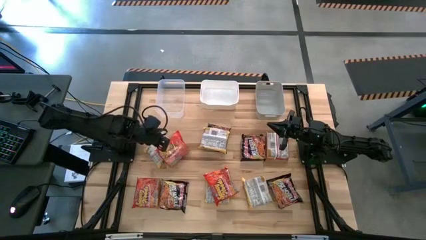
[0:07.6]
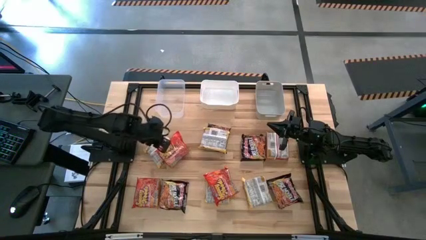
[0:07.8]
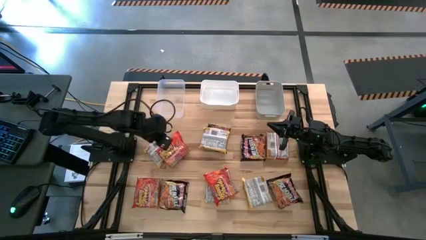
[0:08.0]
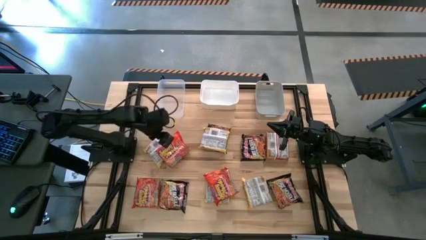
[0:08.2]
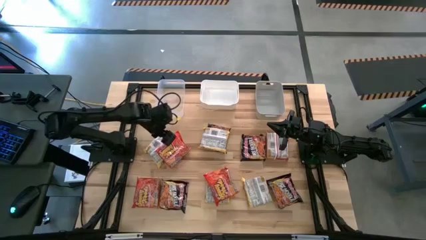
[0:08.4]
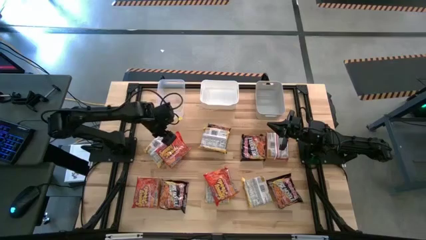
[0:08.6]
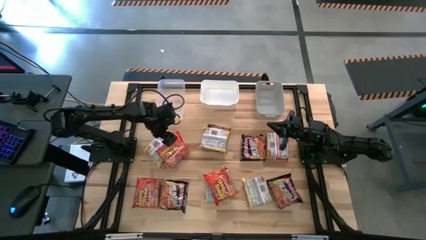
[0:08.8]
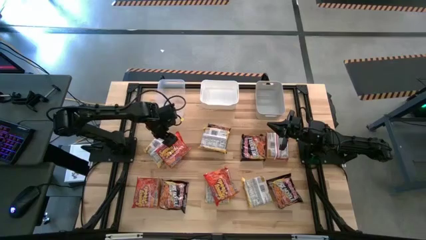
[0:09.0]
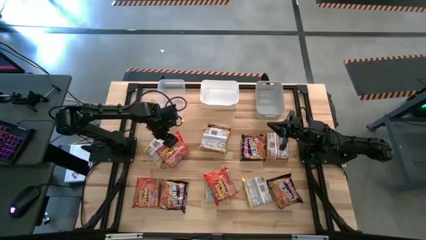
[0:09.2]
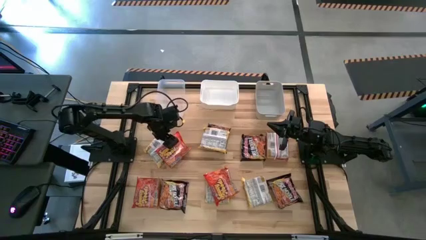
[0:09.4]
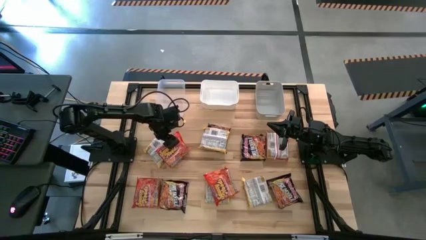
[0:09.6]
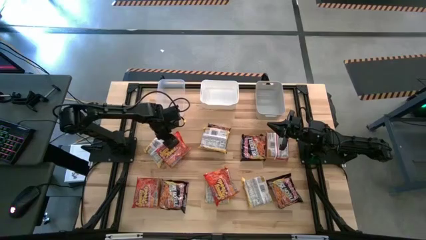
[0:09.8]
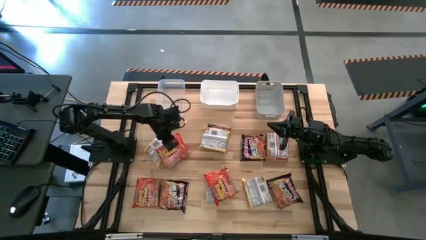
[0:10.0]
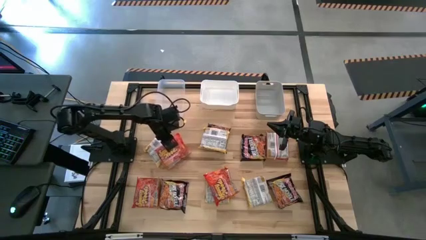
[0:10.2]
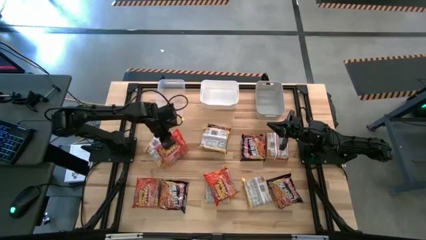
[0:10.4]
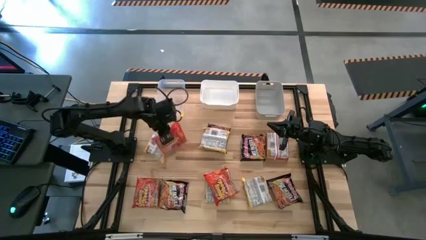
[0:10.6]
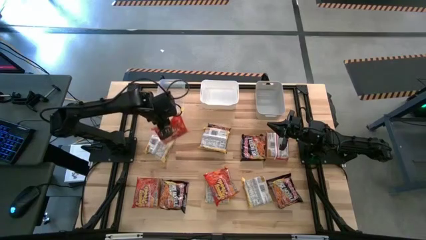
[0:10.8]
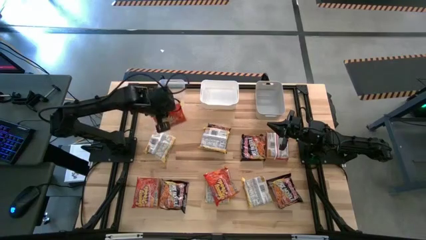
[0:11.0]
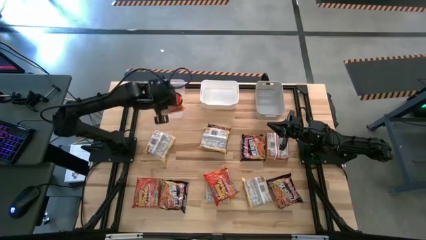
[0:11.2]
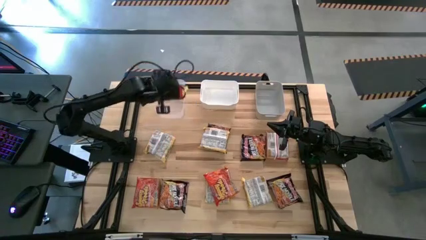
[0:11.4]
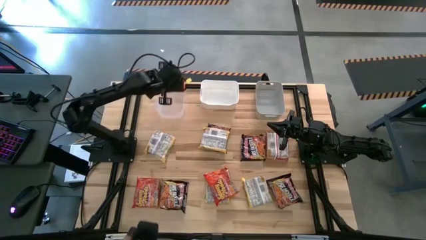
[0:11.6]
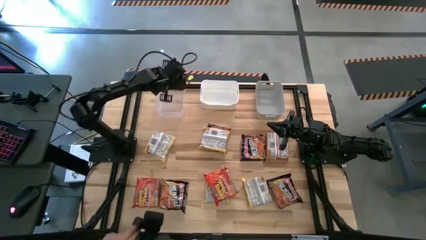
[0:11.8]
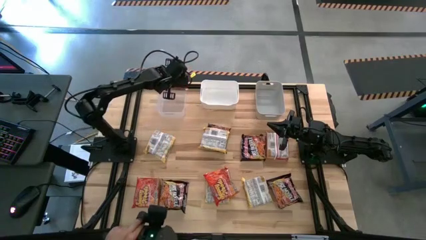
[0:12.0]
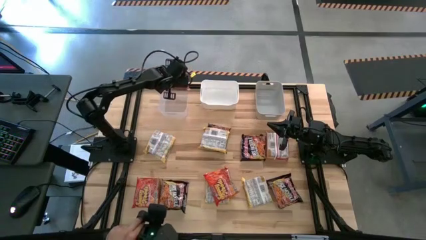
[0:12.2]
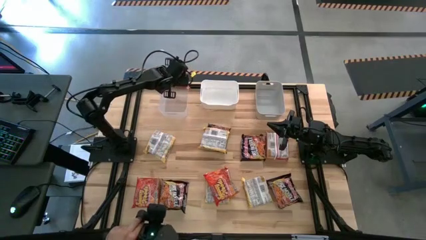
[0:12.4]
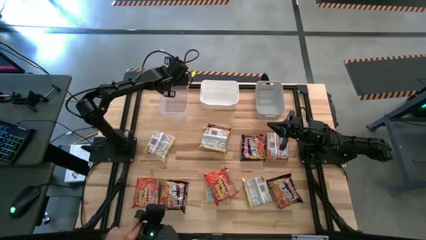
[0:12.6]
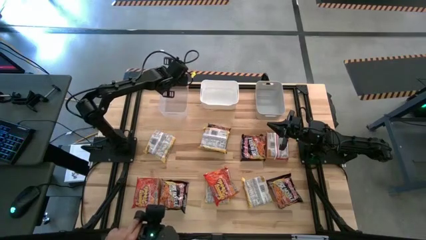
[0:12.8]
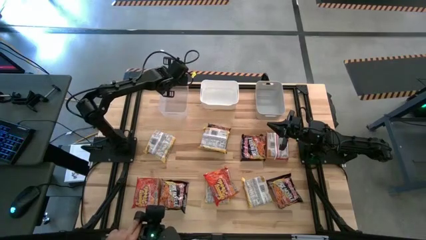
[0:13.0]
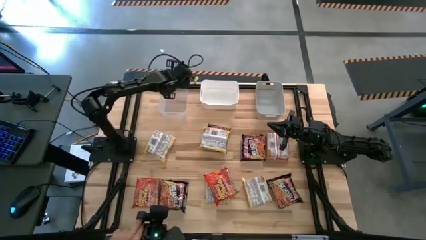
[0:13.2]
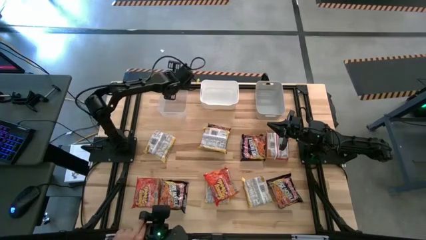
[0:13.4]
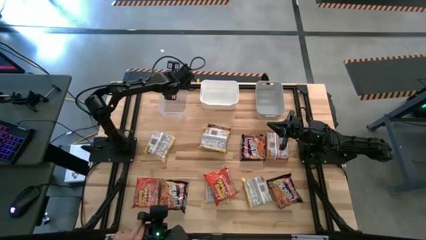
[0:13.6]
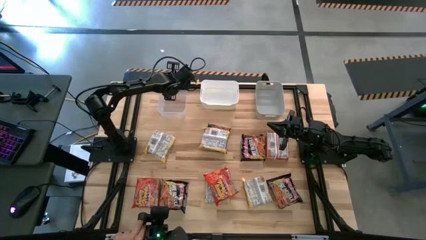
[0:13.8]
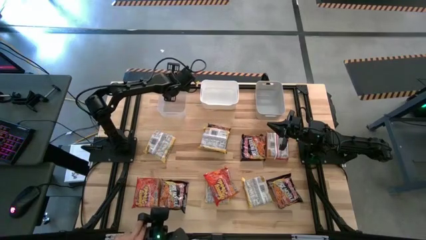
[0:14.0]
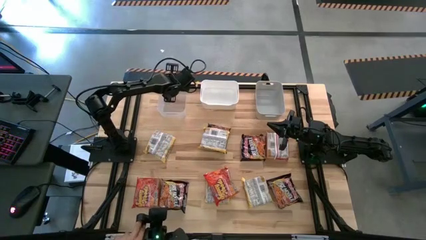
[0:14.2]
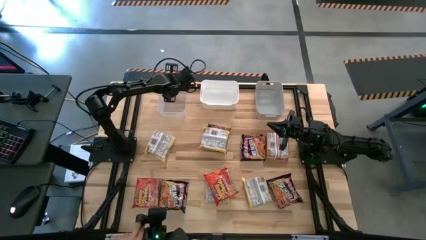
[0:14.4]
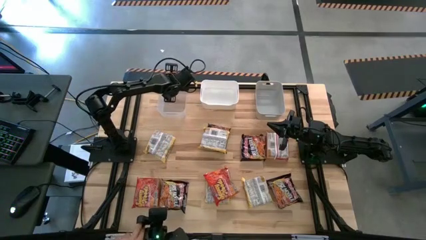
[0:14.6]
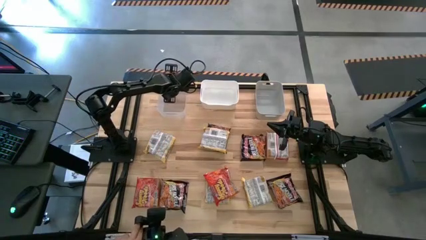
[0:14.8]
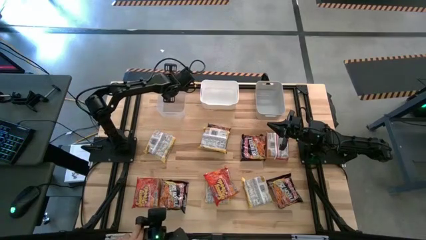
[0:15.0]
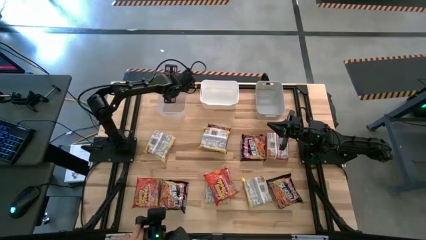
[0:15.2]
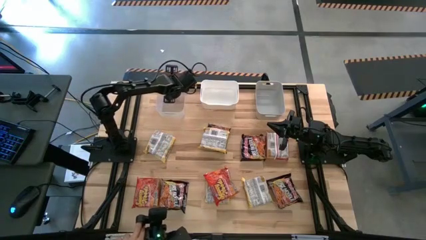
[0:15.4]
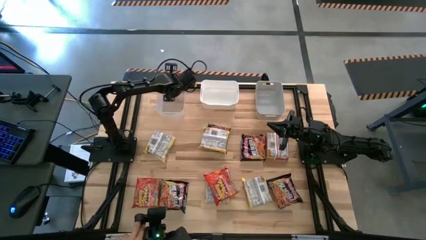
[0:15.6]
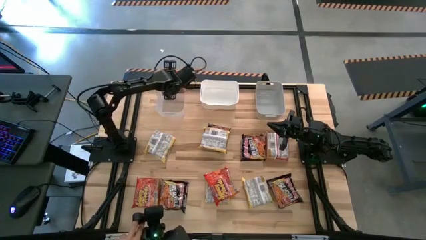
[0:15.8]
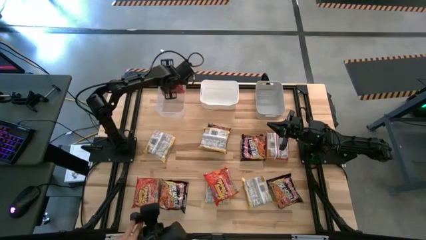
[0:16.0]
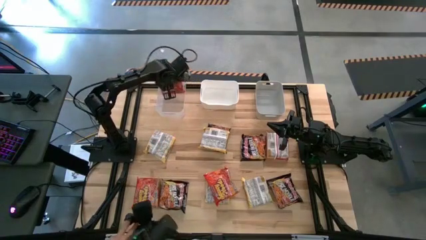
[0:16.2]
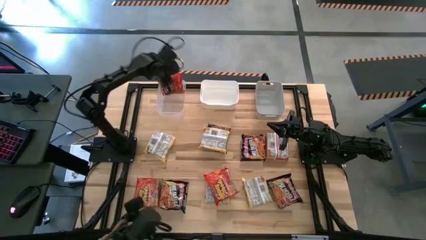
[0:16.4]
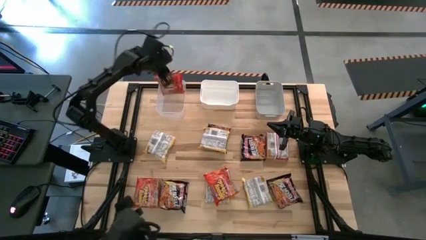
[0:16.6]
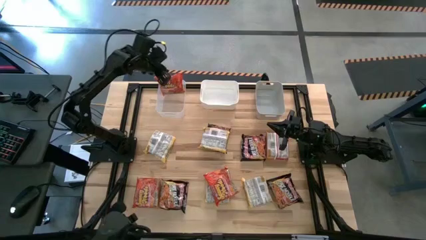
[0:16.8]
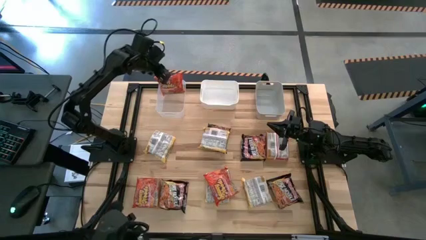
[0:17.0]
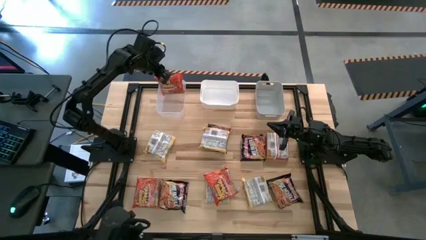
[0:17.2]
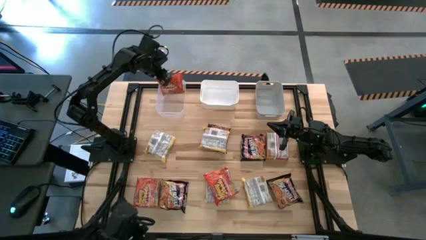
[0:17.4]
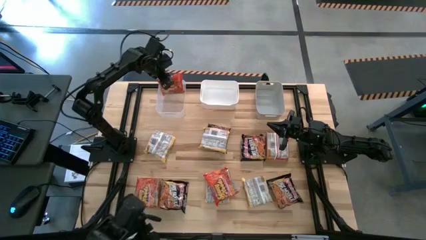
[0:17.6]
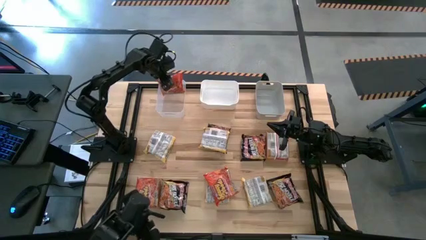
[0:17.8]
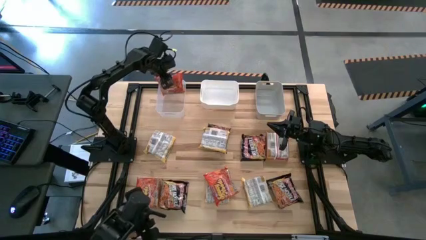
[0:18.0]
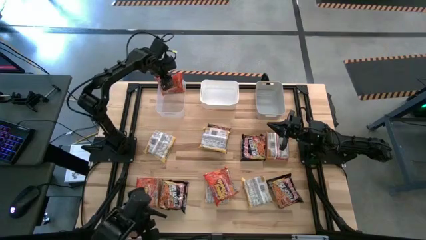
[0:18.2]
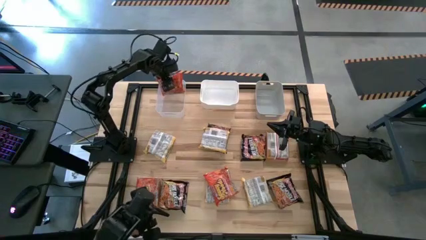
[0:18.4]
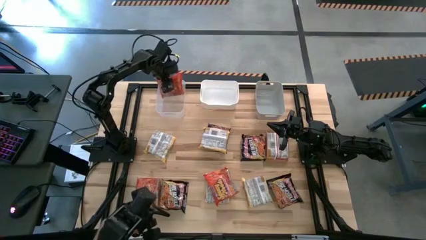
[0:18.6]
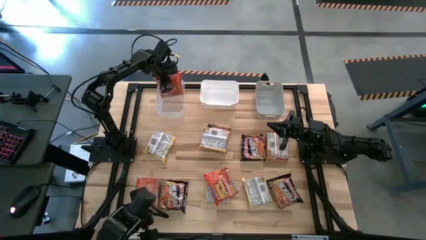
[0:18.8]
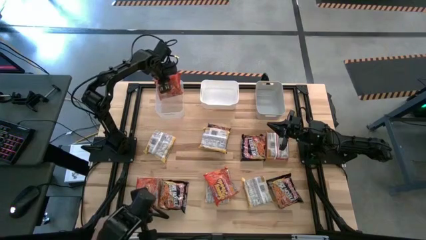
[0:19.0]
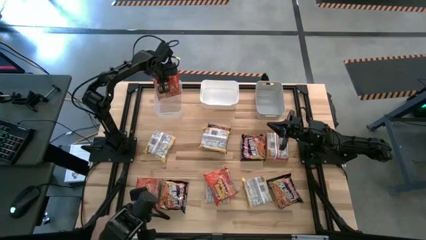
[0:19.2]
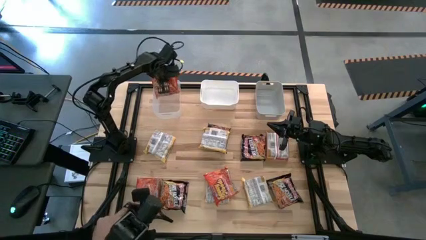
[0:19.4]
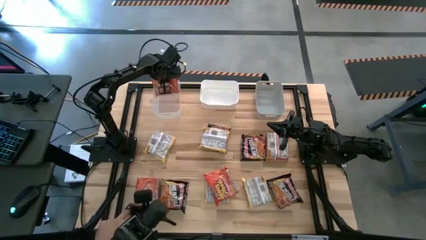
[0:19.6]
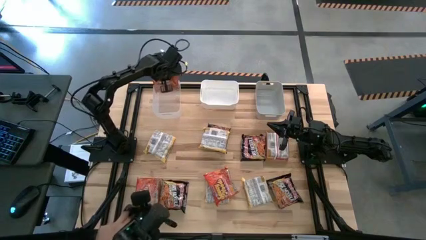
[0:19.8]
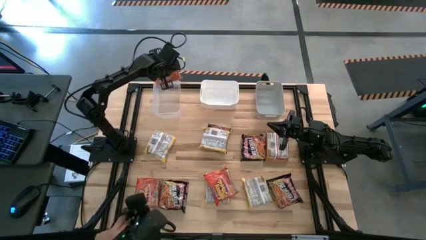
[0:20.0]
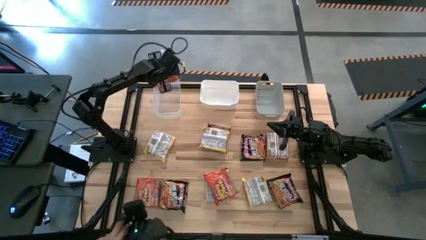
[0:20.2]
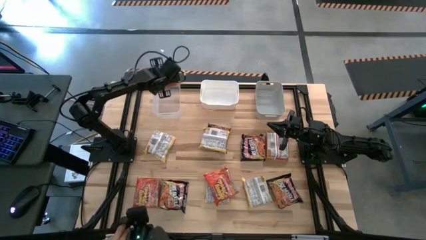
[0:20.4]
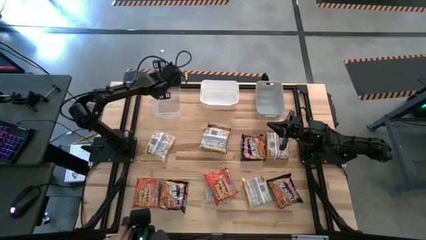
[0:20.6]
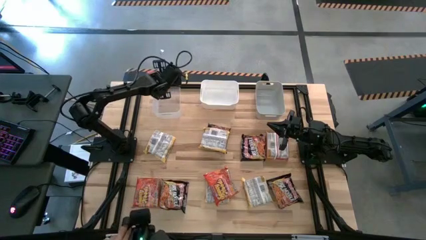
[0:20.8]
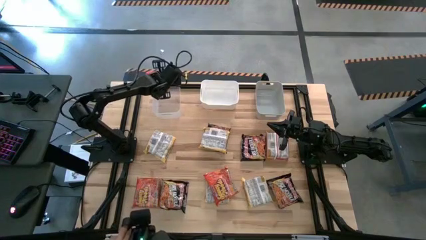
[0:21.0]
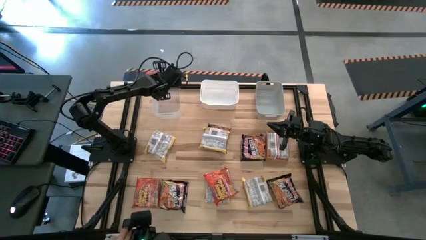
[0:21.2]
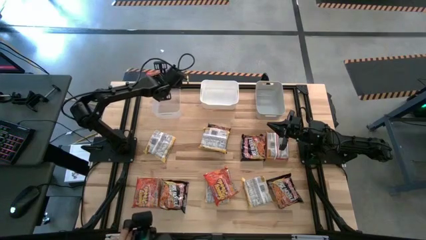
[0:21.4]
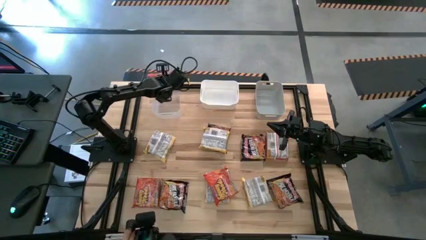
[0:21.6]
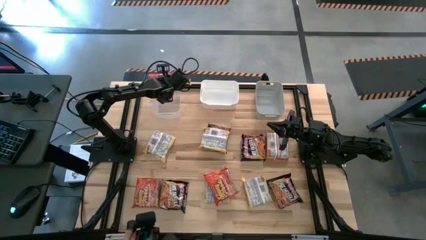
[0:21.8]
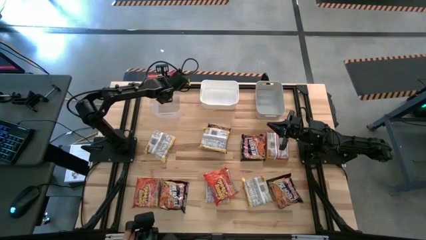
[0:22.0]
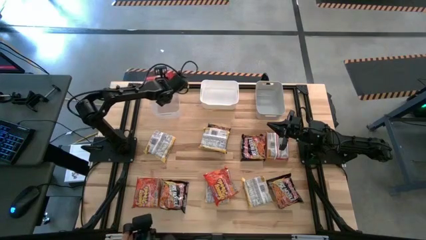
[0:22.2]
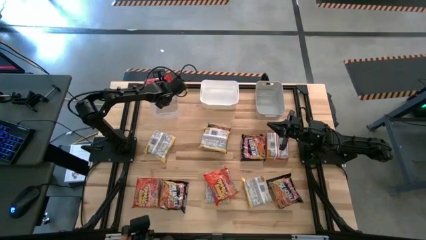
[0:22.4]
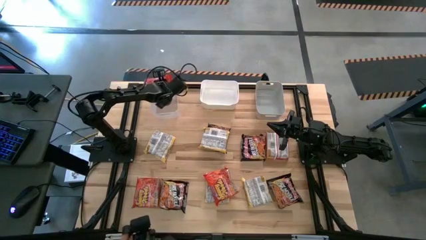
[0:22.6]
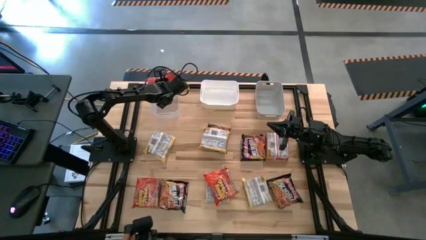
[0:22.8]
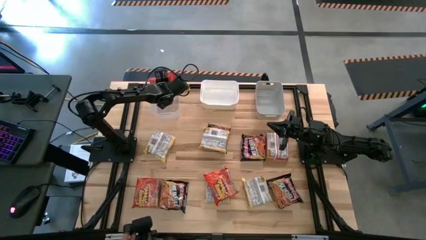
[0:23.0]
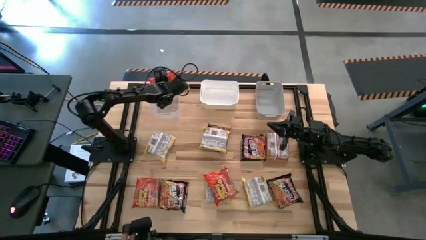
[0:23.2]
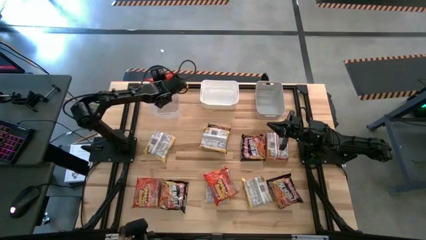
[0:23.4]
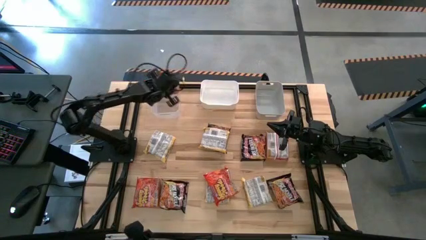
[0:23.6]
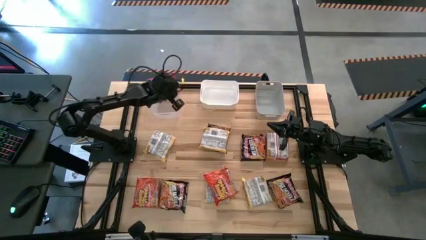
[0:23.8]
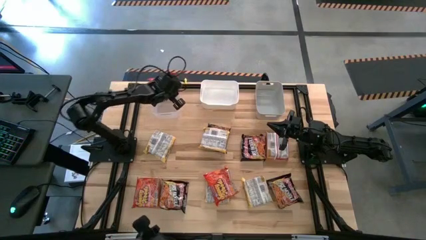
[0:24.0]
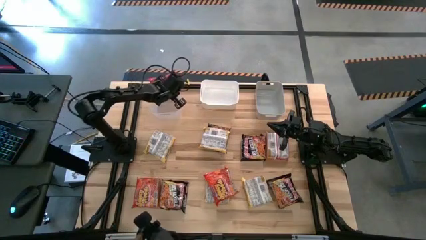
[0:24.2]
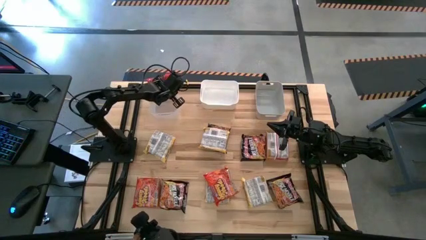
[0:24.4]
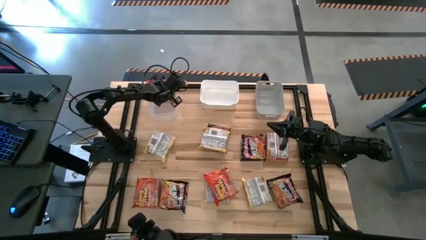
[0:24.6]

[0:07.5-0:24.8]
Task: Sort Maruchan noodles
Put the orange noodle pack into the transparent bin
